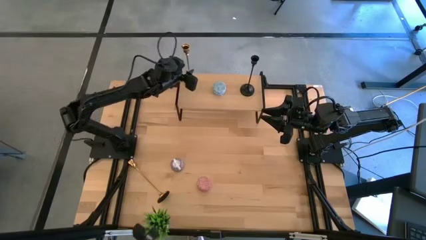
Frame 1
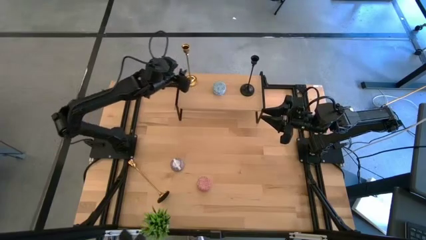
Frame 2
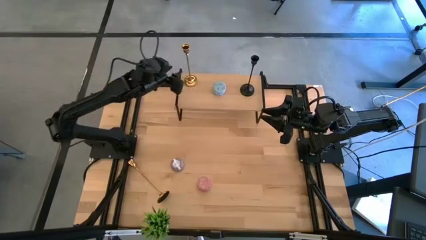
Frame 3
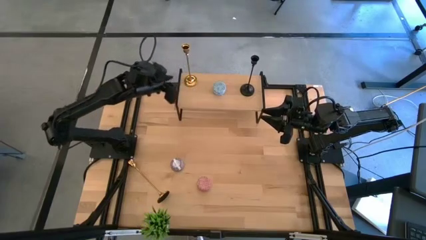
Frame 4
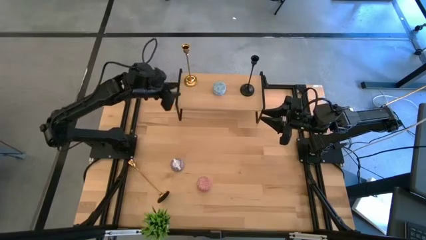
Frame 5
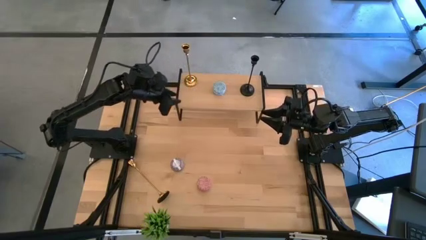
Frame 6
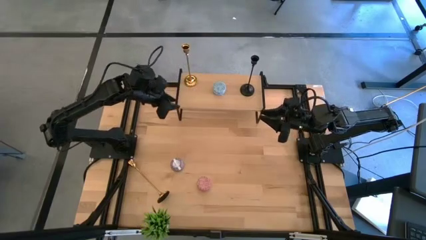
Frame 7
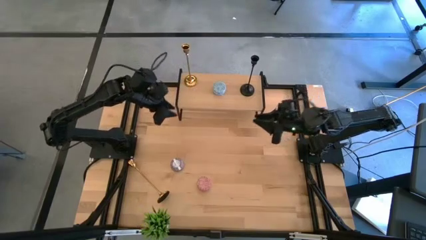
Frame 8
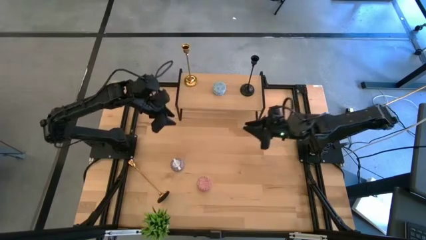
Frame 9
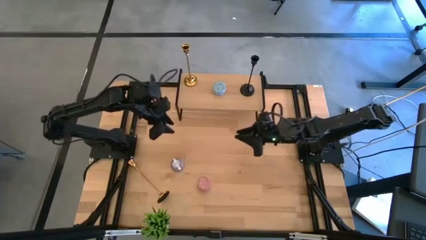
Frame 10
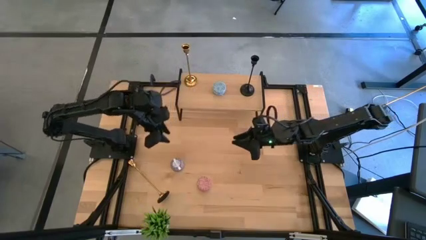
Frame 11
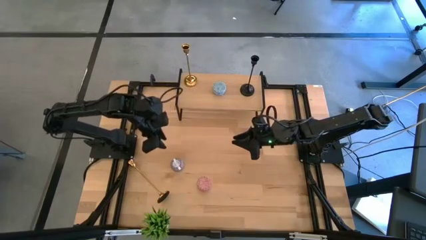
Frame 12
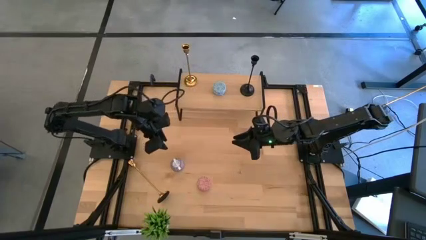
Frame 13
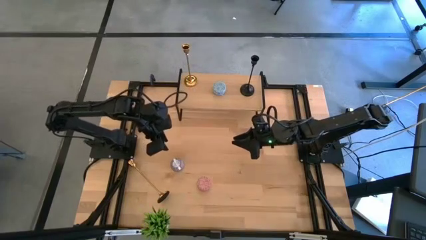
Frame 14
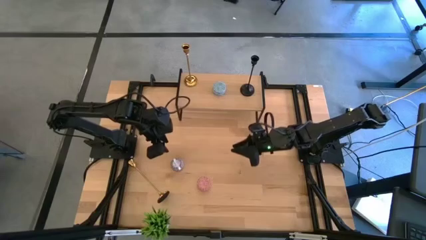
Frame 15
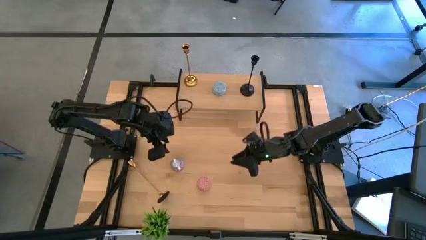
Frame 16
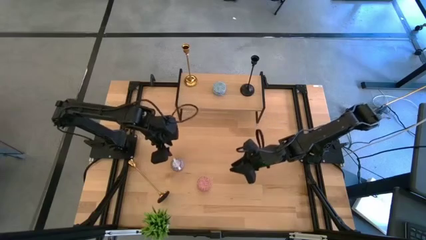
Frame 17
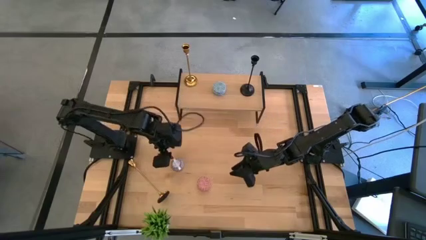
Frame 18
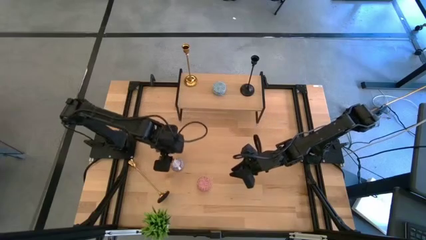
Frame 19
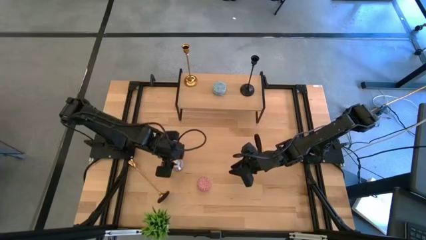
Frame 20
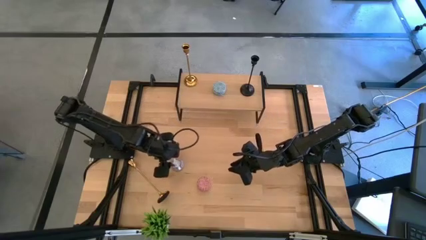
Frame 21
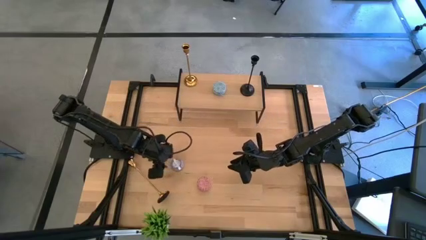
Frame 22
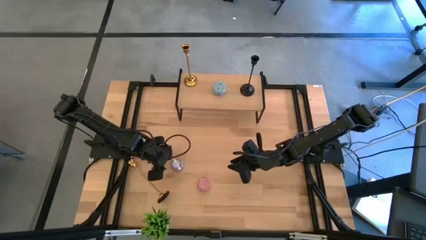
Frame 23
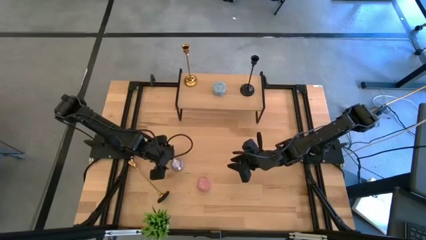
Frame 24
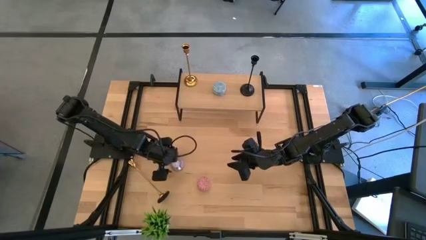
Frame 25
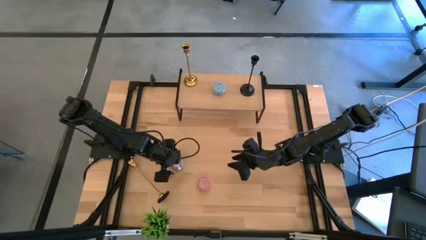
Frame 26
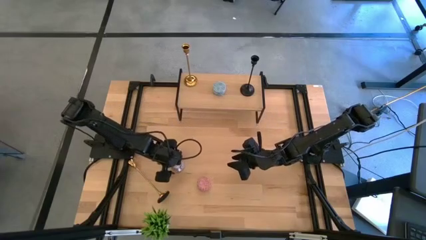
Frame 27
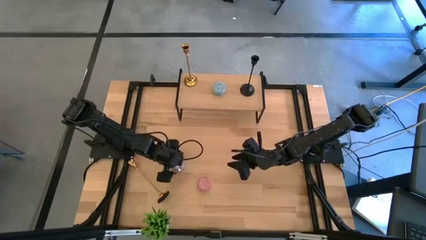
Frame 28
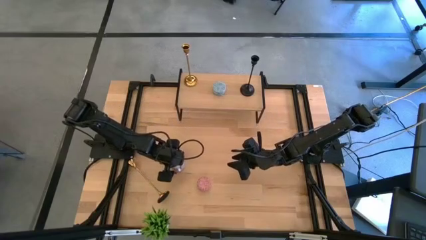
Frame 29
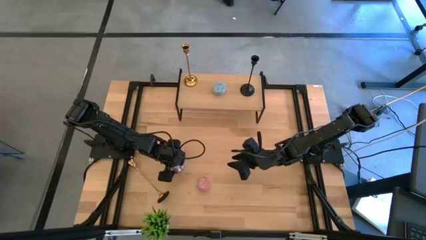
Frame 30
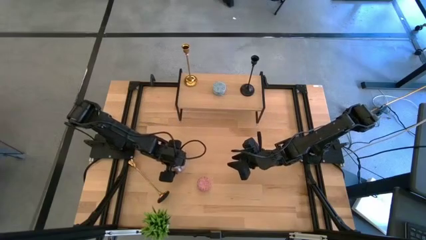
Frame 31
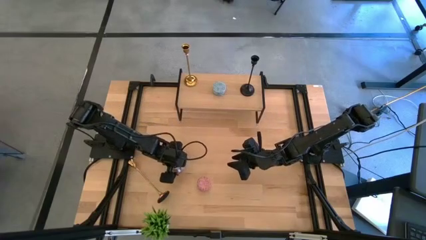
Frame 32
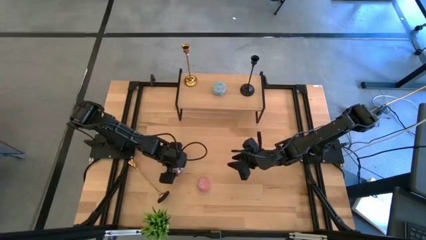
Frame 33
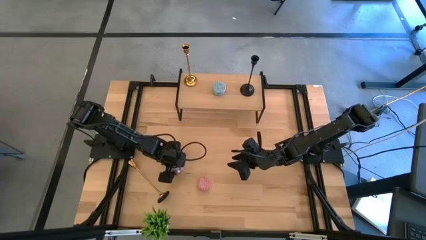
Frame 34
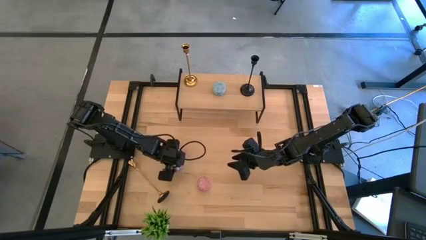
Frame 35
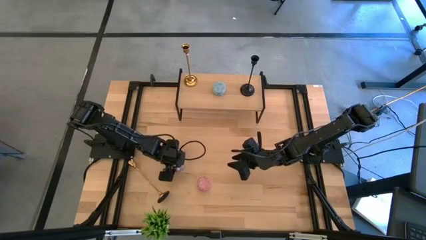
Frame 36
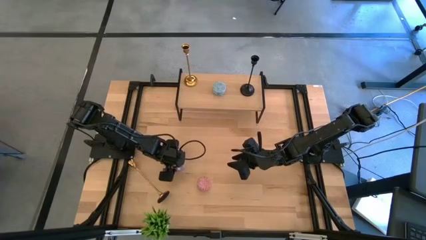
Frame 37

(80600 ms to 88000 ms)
Task: Pick & Place candle stick holders
Put the red scented candle on the shelf

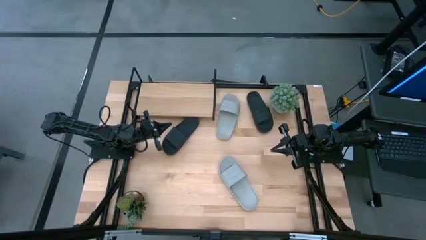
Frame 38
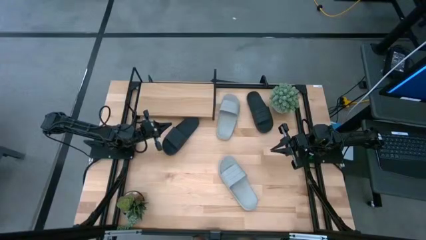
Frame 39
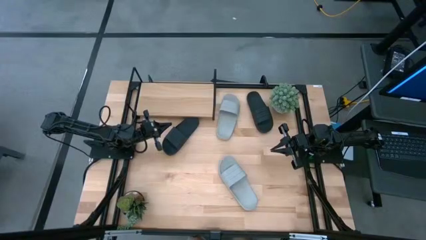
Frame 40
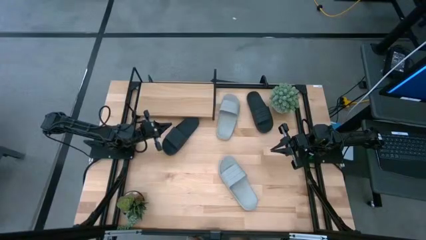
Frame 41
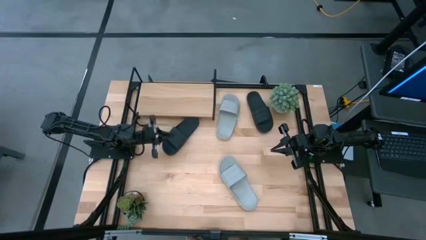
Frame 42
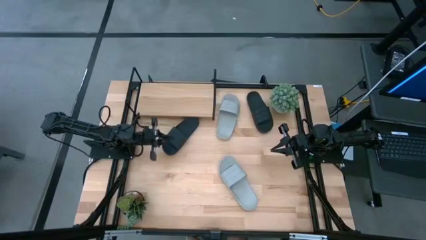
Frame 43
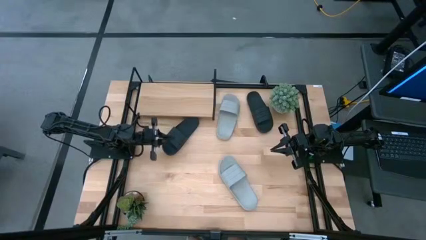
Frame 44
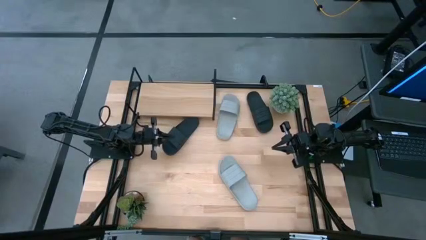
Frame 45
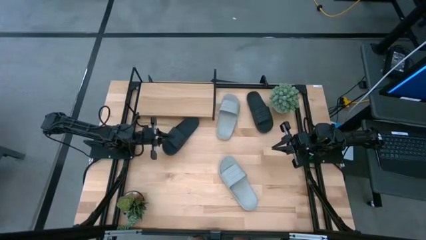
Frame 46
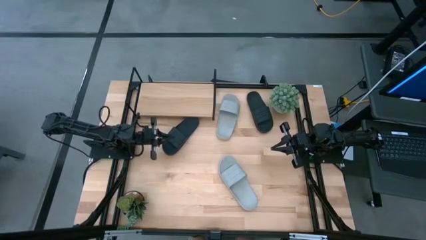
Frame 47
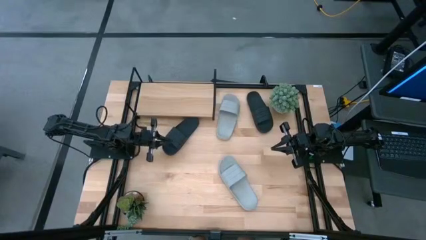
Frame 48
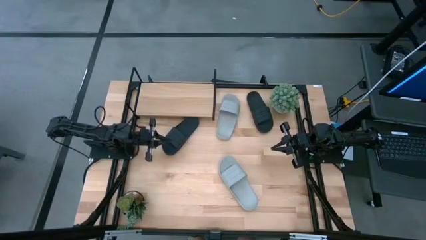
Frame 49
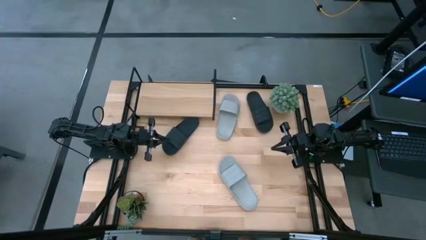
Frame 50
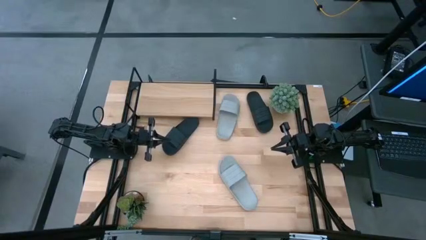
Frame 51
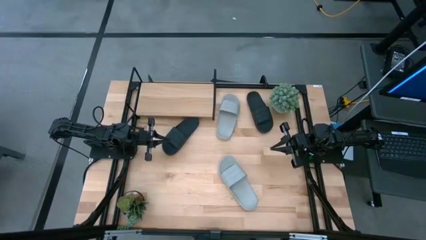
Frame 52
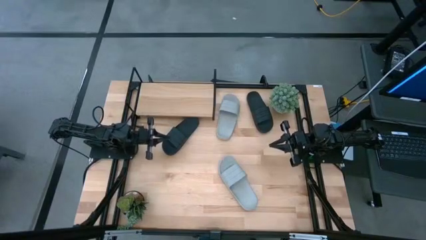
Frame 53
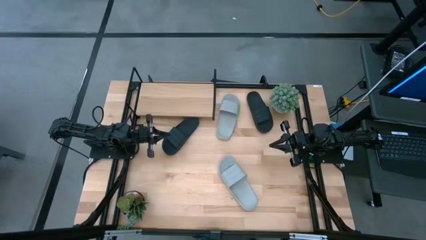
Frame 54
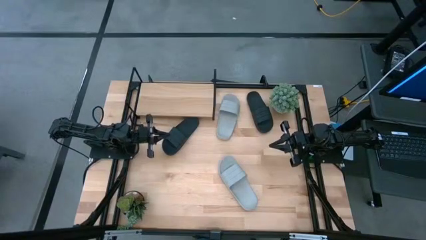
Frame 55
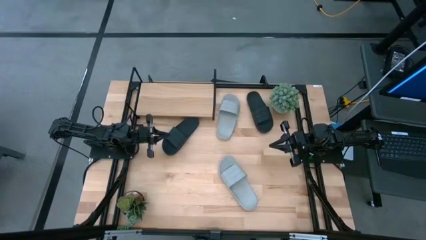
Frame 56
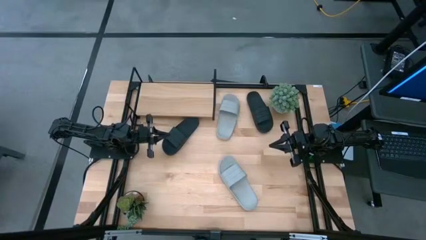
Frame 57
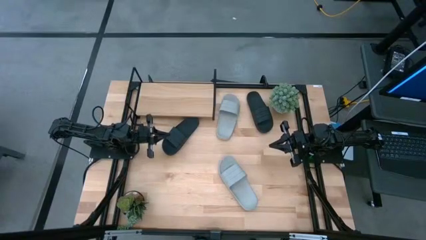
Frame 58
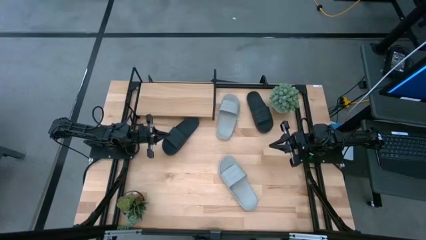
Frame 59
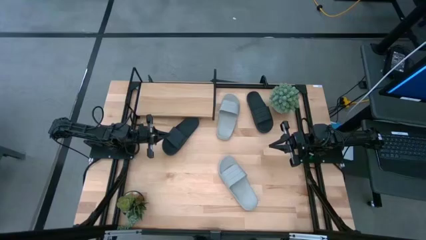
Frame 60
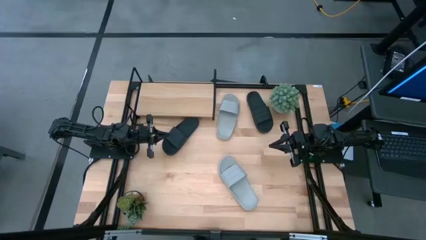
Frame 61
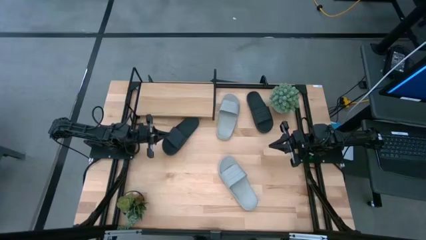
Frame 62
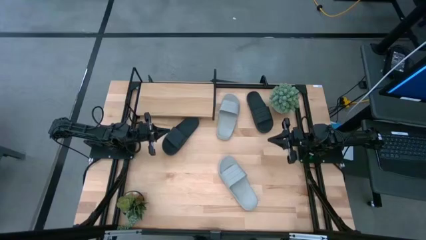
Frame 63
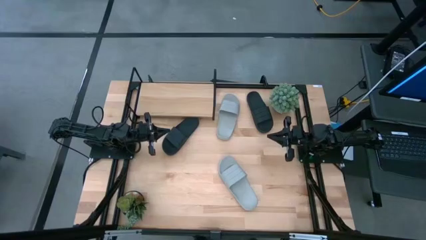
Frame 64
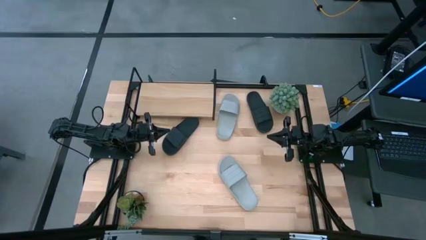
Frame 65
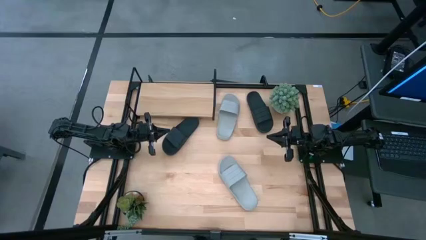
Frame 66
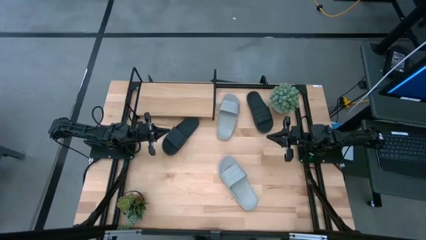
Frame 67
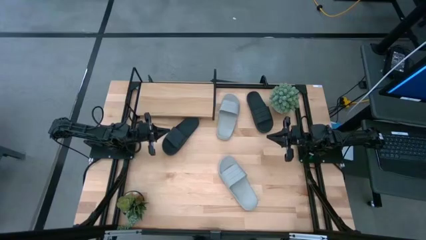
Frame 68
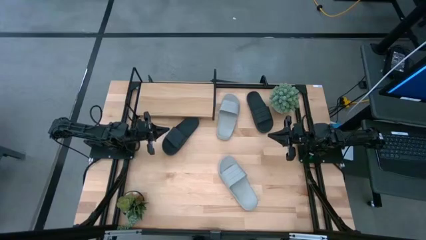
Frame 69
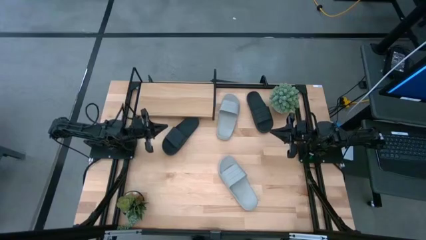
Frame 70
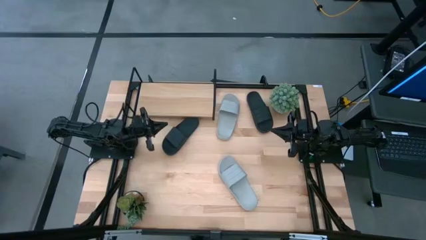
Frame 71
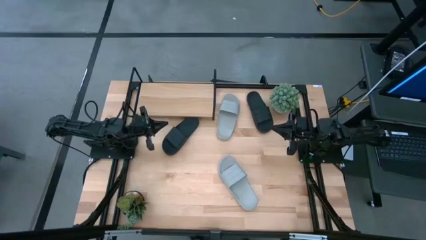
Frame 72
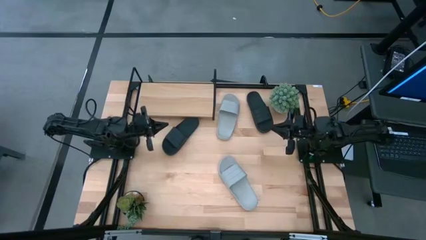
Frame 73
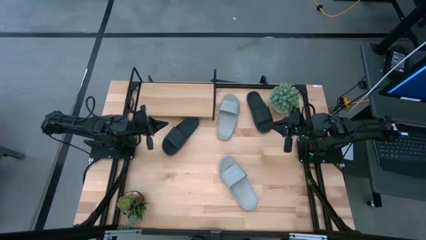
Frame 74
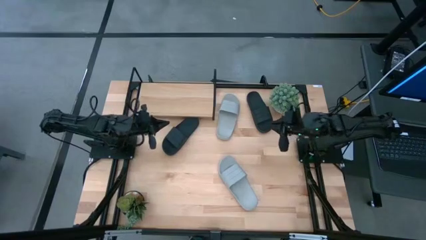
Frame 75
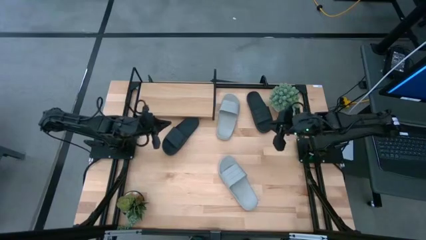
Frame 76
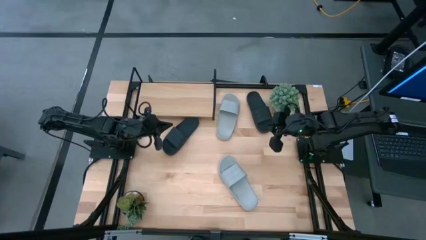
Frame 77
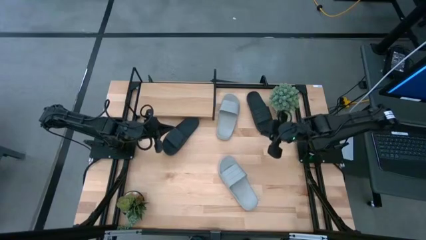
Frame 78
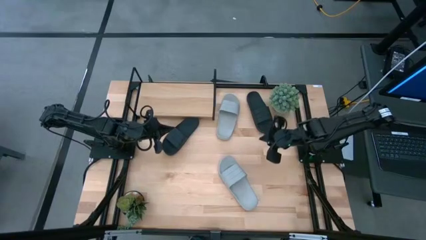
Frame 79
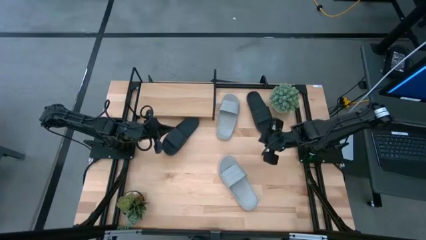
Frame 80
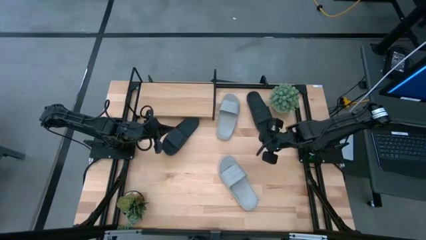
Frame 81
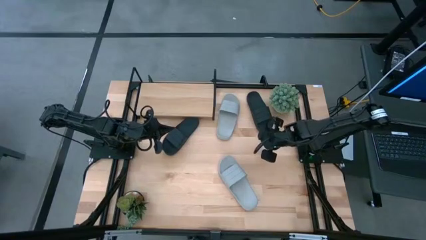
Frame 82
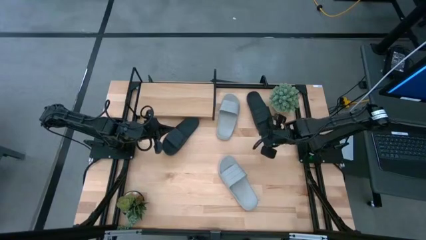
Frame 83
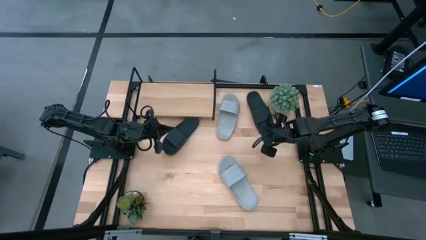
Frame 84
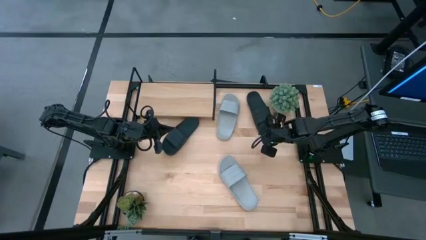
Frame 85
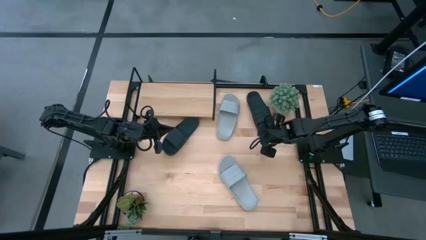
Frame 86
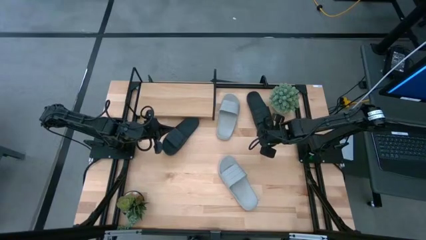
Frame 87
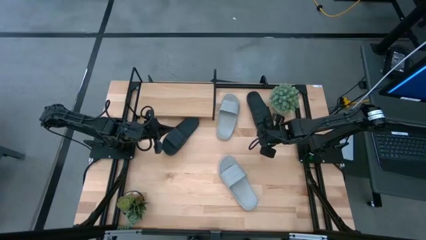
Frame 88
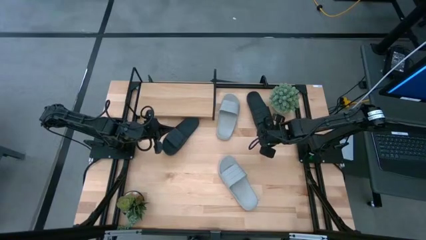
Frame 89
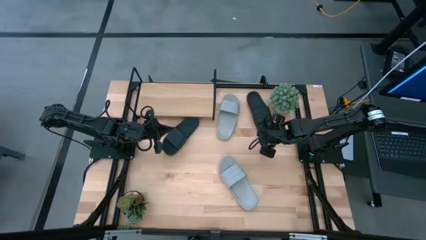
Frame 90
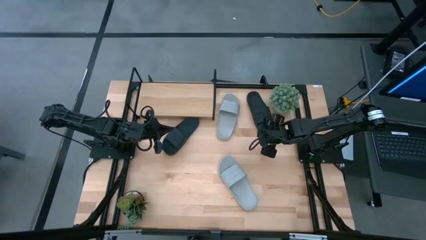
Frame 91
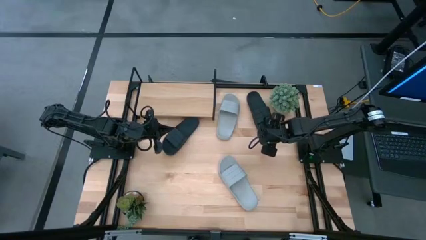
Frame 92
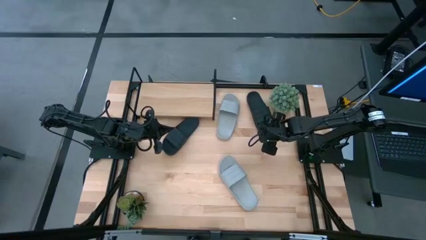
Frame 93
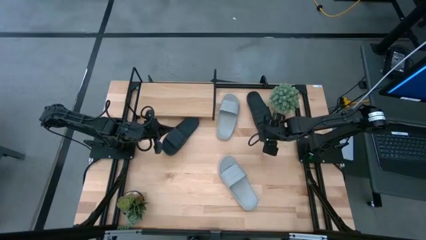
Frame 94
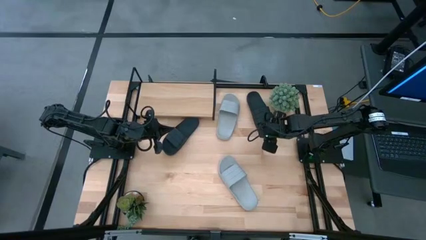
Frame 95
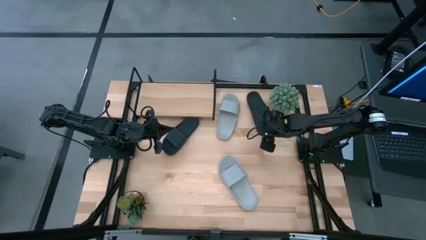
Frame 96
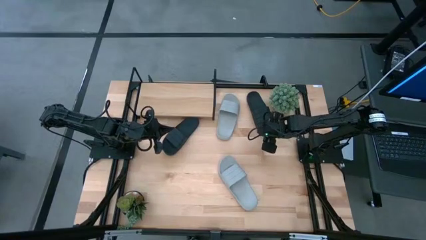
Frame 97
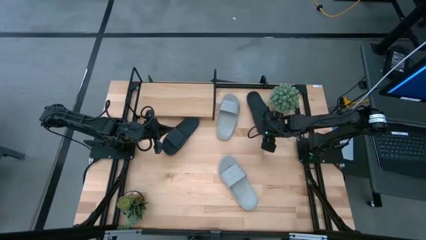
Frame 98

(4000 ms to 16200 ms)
Task: Pick and place slides into the shelf
Put the right black slides on the shelf
